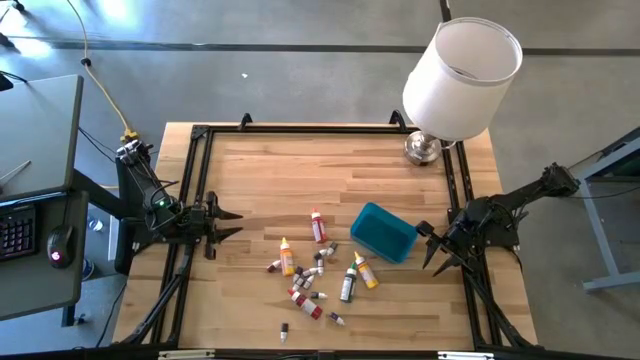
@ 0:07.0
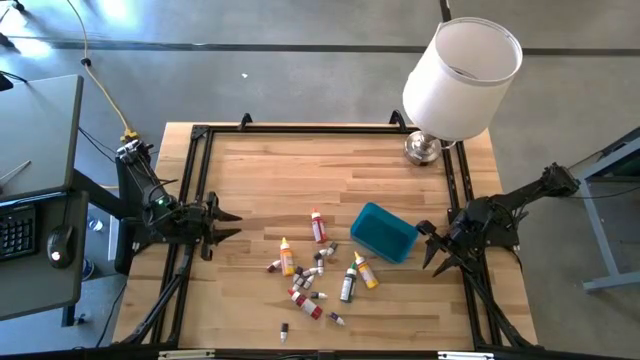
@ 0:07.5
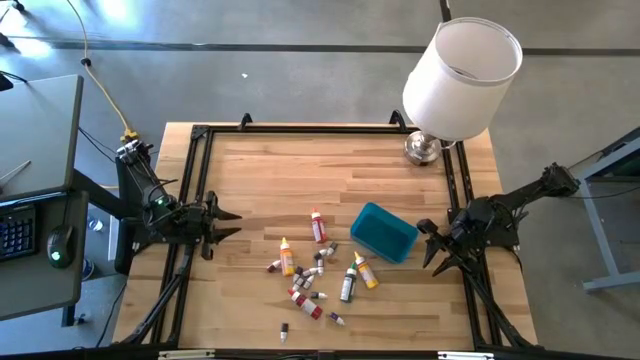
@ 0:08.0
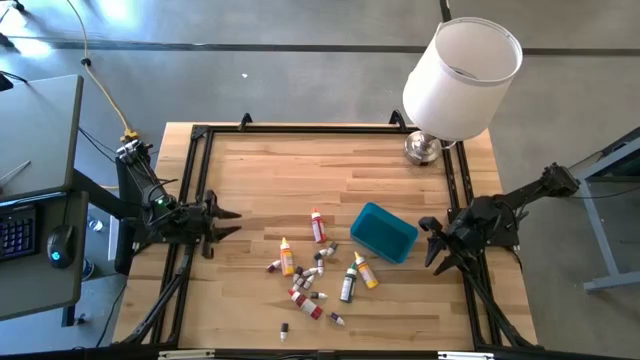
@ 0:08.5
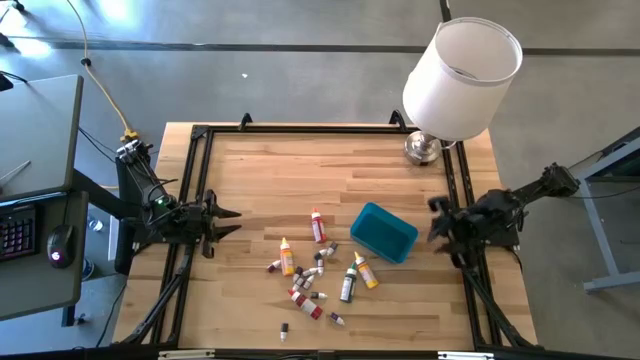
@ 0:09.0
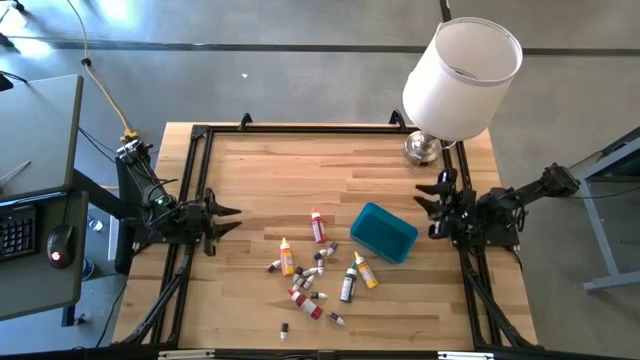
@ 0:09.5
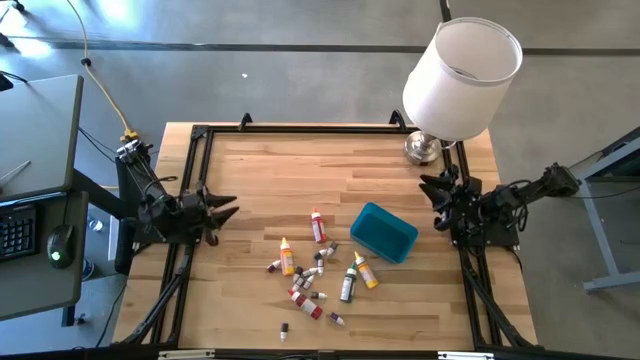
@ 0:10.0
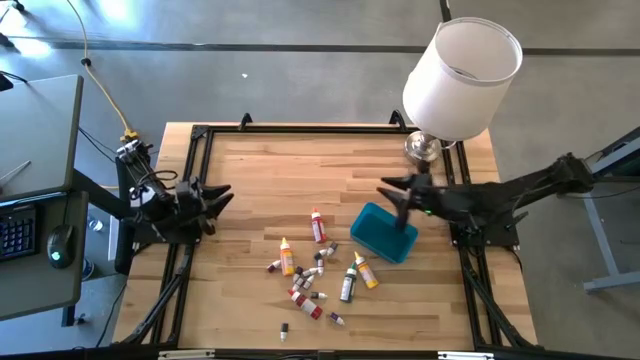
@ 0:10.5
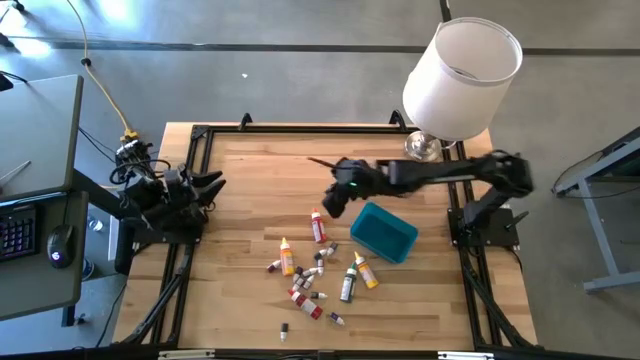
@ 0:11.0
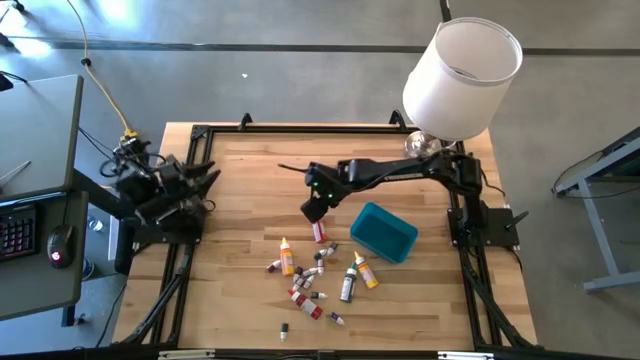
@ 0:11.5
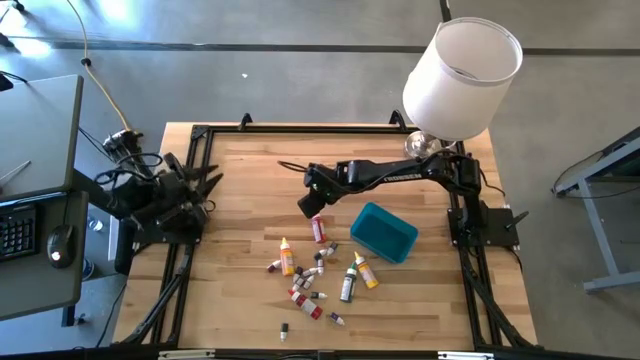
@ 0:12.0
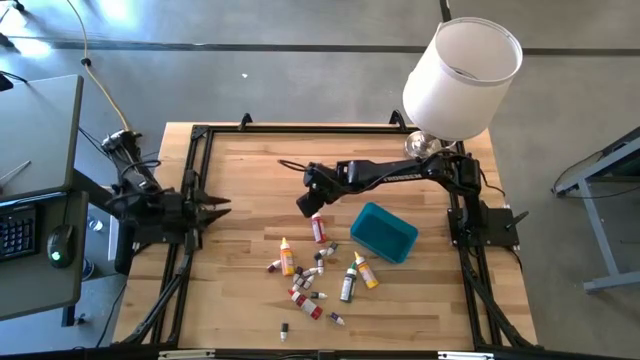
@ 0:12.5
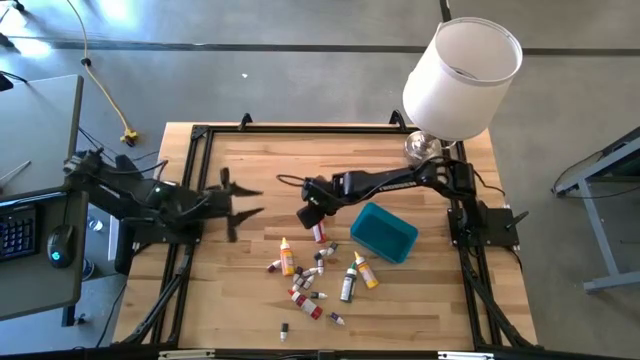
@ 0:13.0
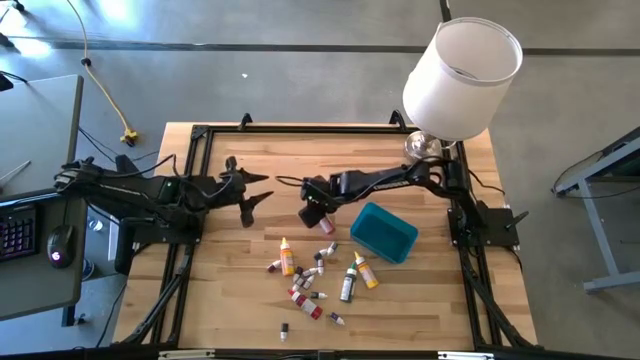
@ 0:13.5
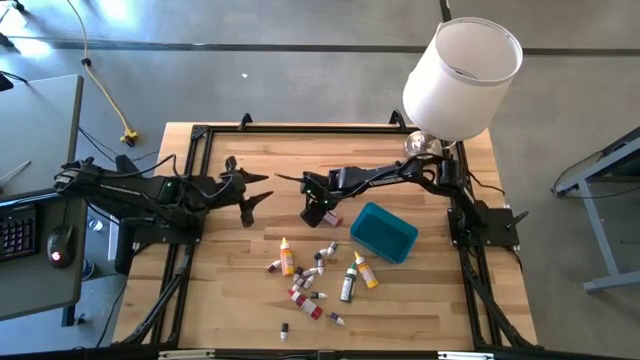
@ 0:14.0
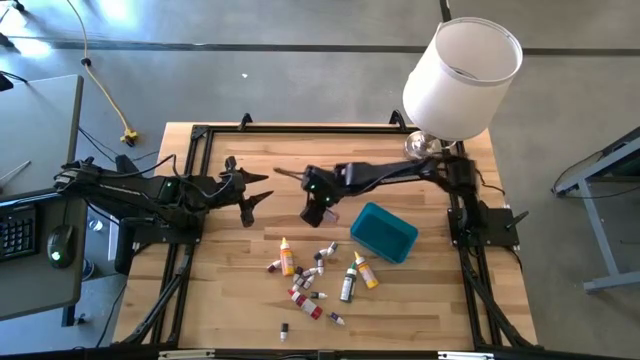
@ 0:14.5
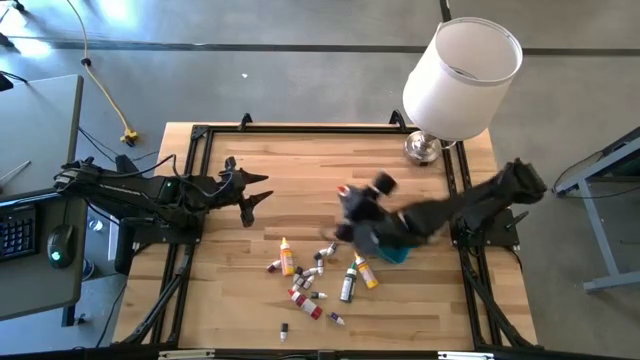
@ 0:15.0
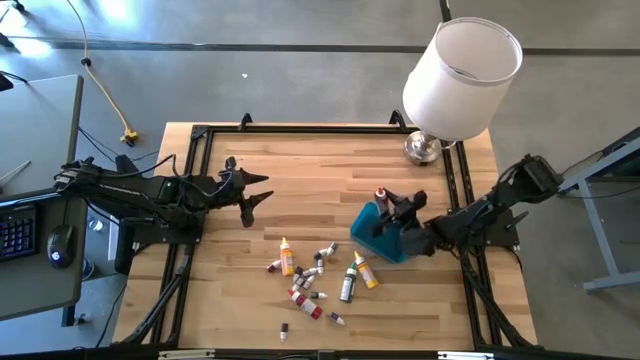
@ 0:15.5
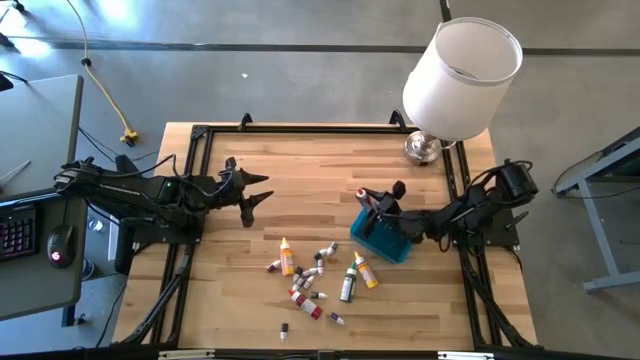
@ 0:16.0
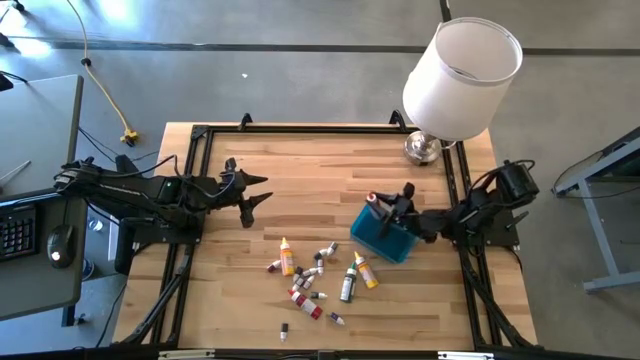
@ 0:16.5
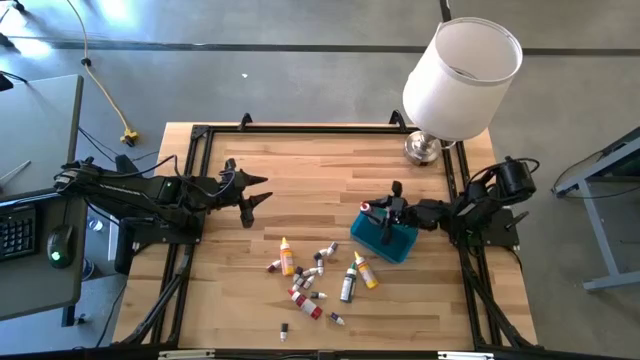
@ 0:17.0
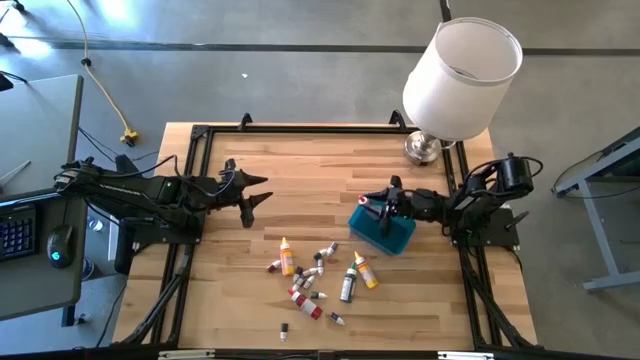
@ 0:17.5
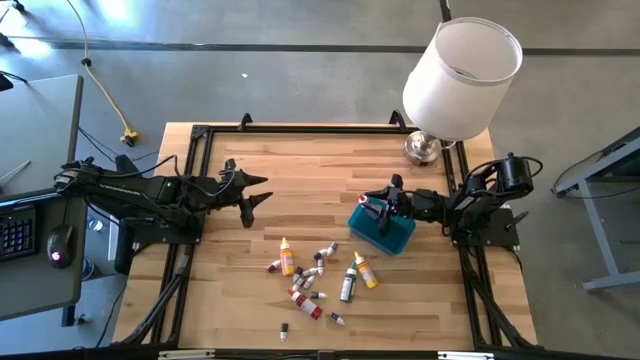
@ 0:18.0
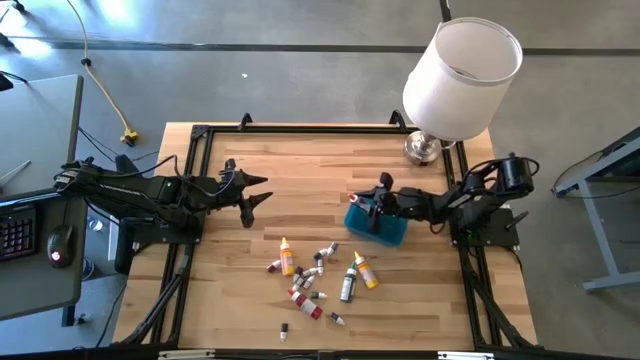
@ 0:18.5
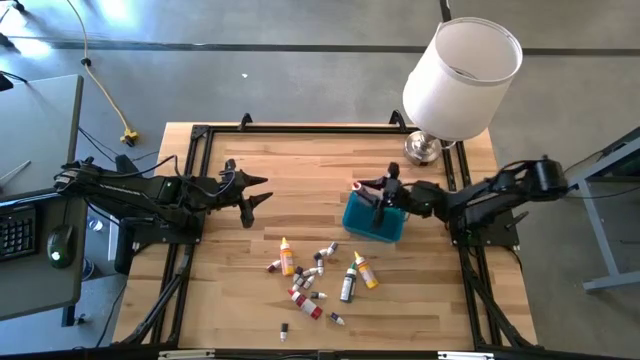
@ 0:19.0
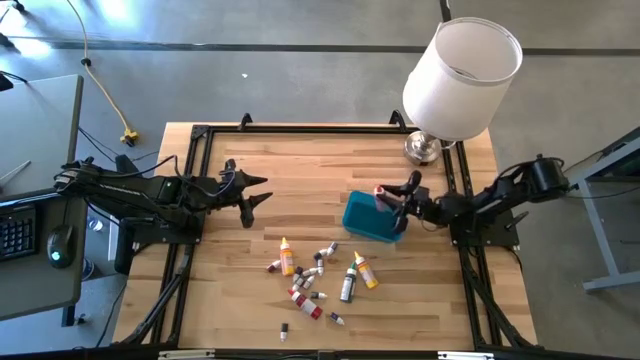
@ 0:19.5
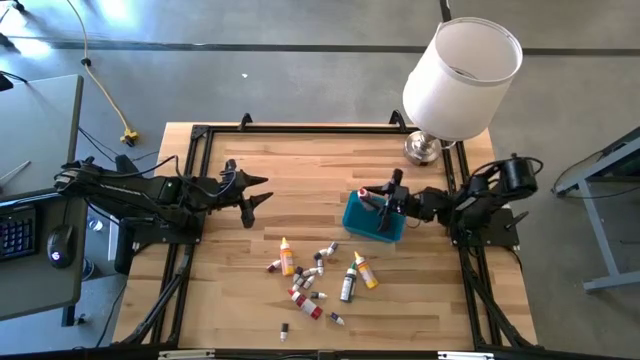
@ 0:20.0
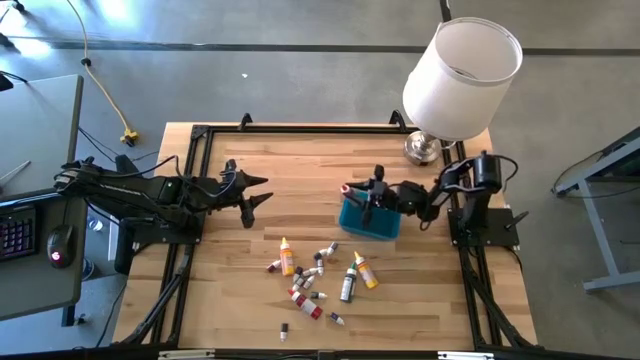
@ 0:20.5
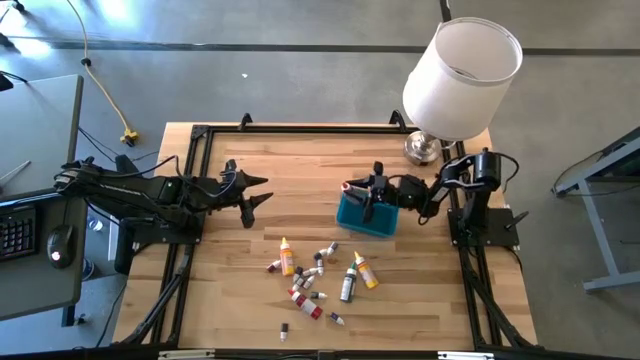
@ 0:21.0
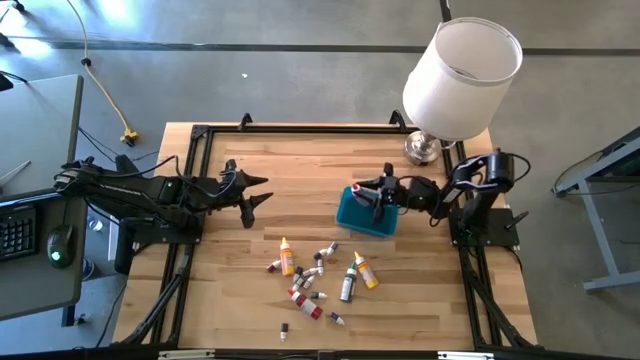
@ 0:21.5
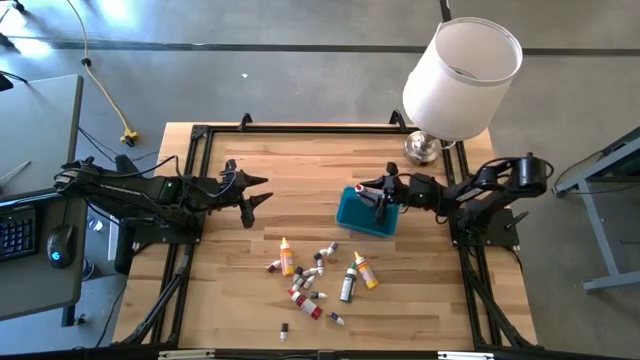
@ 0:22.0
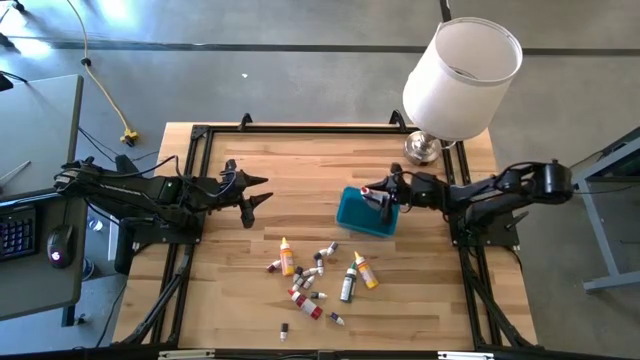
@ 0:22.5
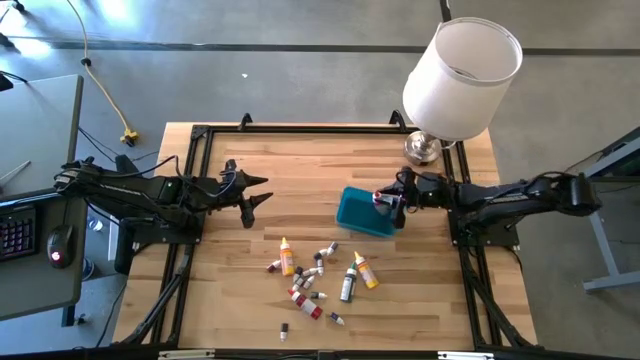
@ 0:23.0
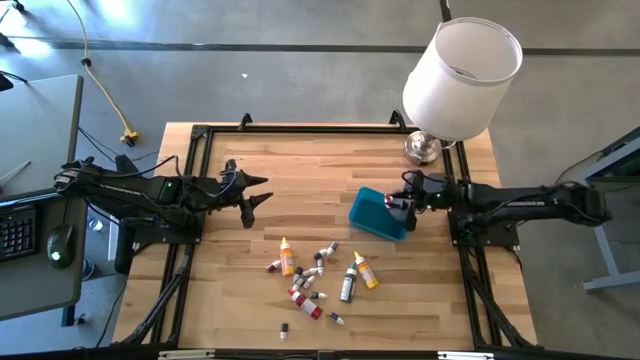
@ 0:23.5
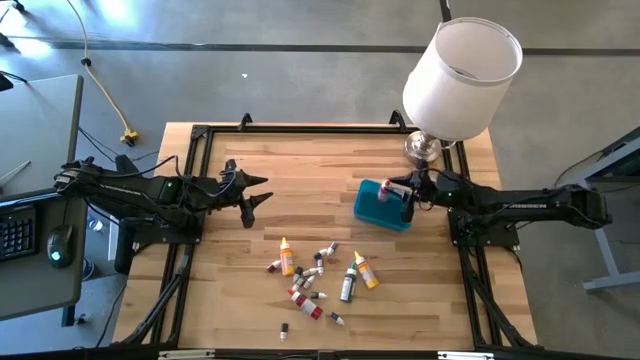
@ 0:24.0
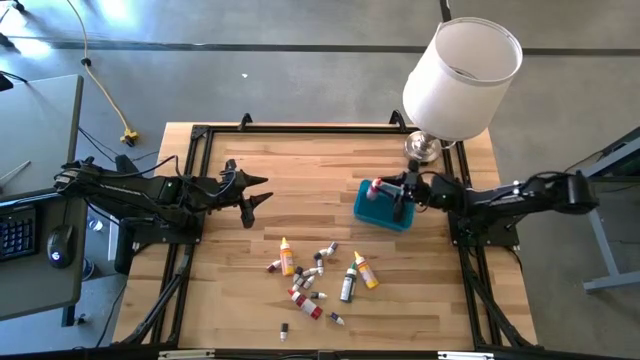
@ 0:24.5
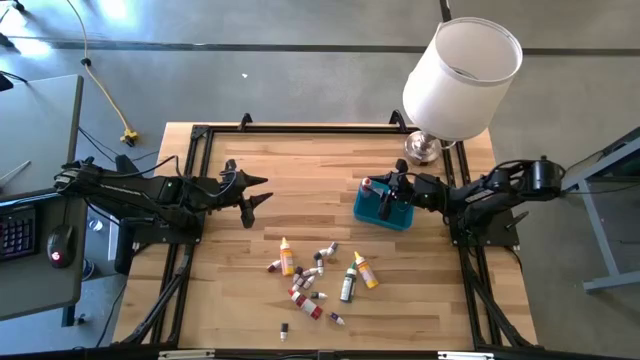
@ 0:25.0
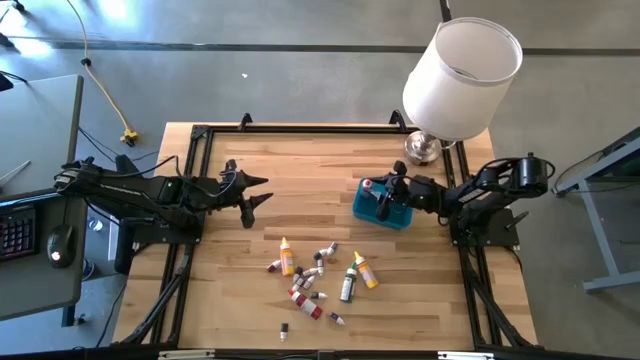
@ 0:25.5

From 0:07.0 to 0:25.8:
Task: Pick & Place food coloring
Put the large orange food coloring bottle into the blue bin

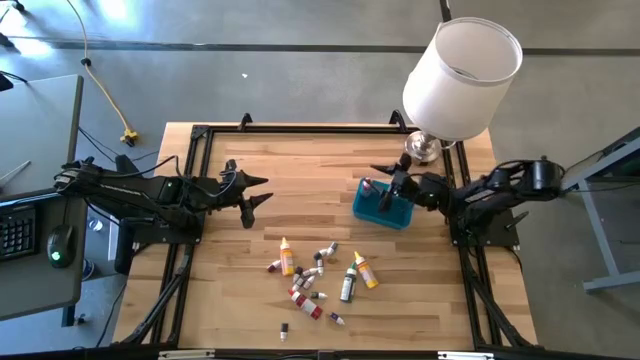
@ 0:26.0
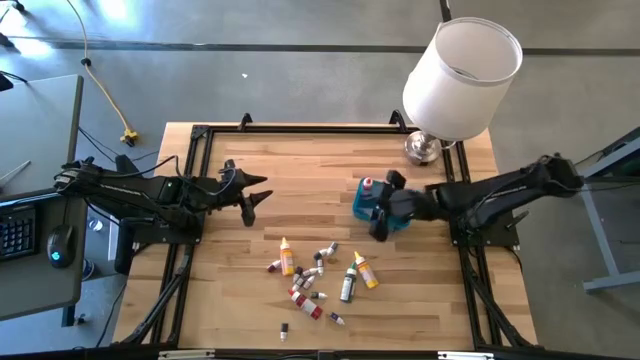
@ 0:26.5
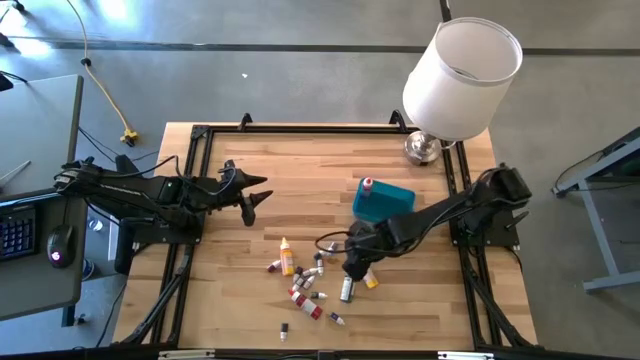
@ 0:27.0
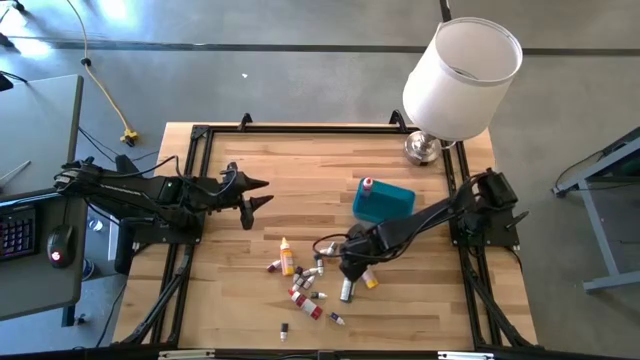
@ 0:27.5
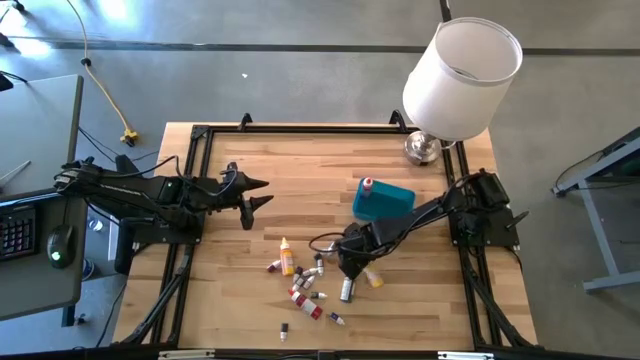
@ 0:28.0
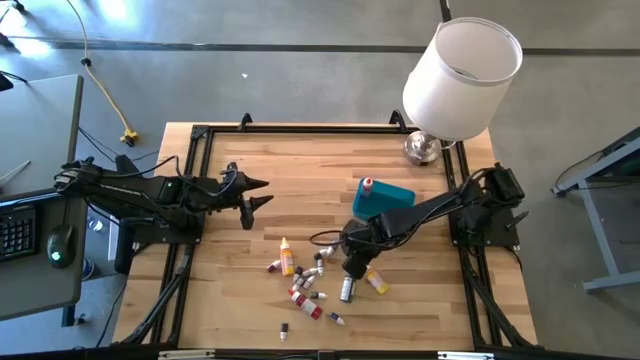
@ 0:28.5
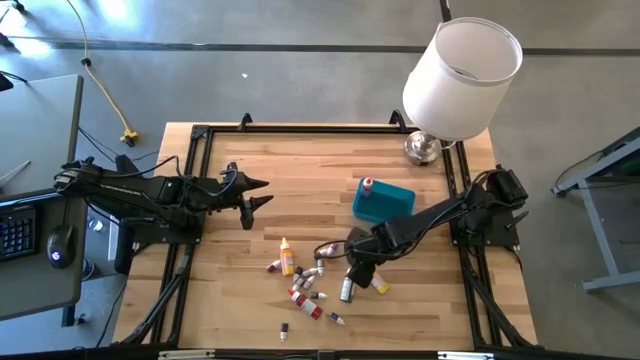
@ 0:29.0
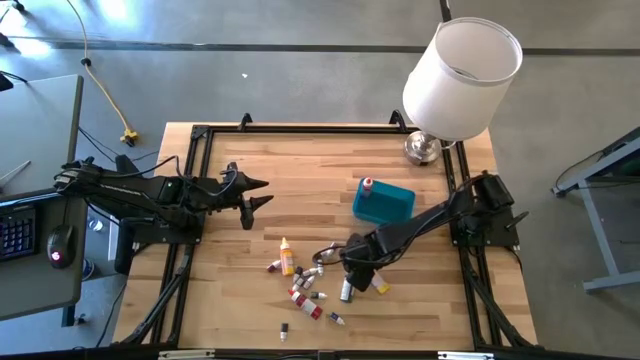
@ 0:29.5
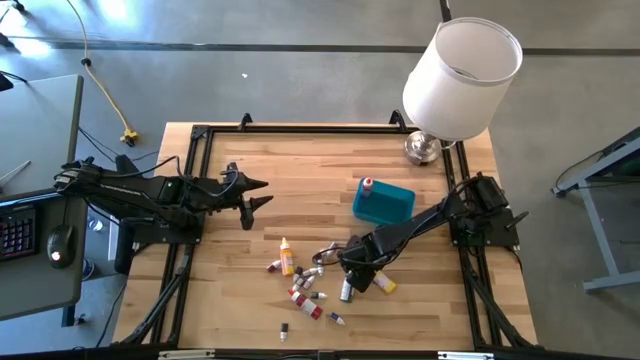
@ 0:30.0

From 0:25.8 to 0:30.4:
Put the right large yellow food coloring bottle into the blue bin
